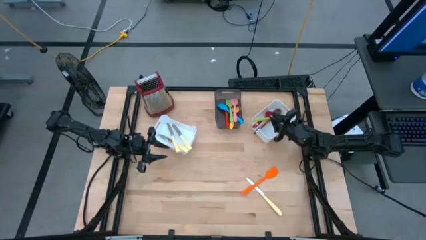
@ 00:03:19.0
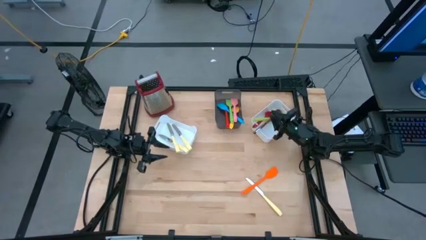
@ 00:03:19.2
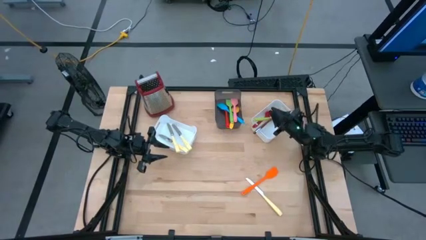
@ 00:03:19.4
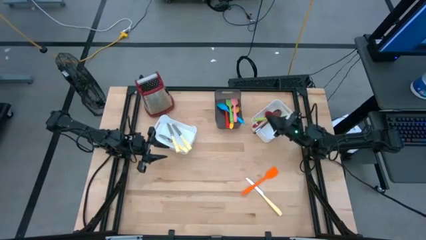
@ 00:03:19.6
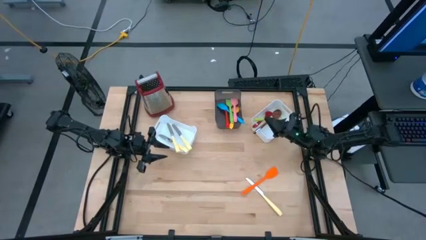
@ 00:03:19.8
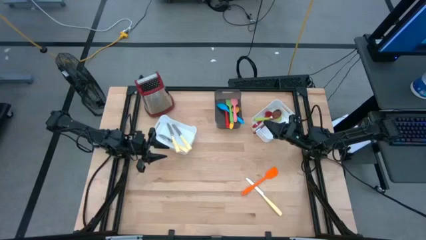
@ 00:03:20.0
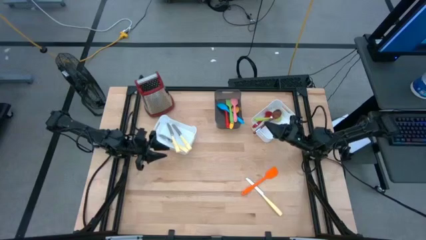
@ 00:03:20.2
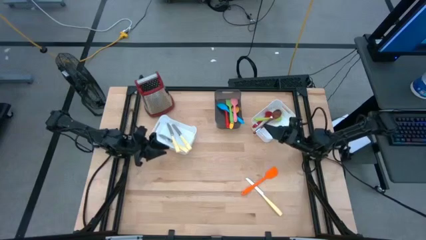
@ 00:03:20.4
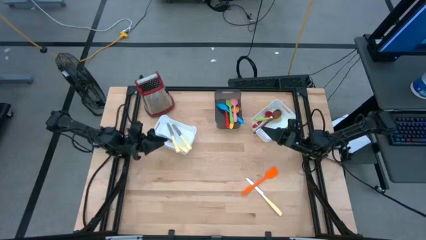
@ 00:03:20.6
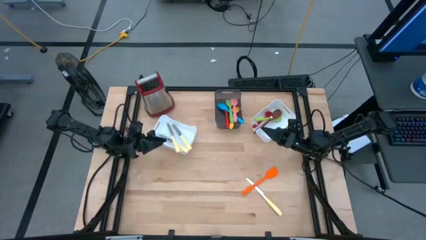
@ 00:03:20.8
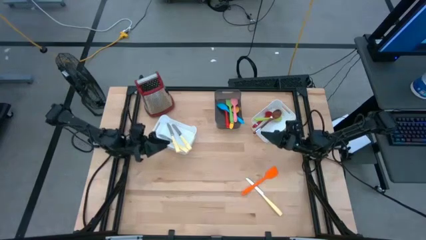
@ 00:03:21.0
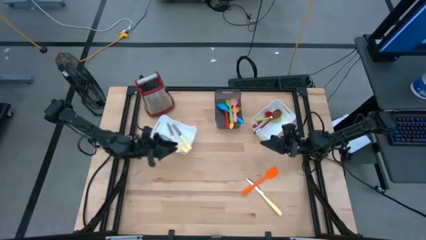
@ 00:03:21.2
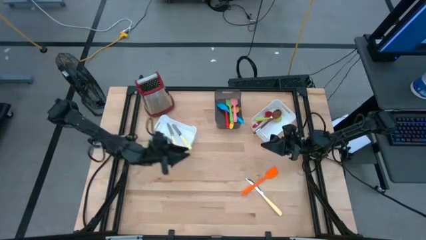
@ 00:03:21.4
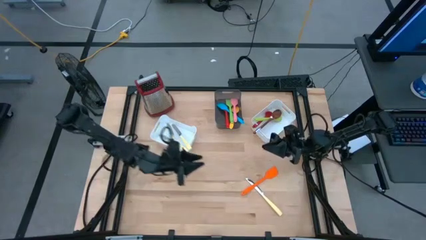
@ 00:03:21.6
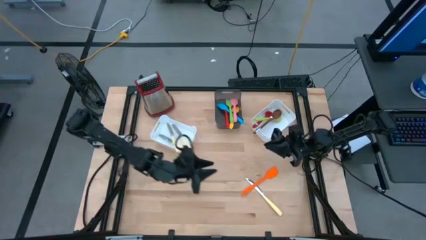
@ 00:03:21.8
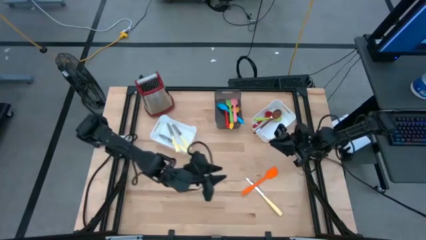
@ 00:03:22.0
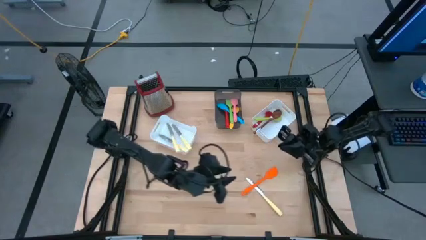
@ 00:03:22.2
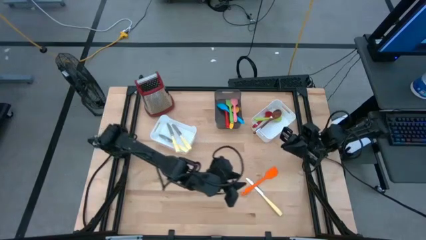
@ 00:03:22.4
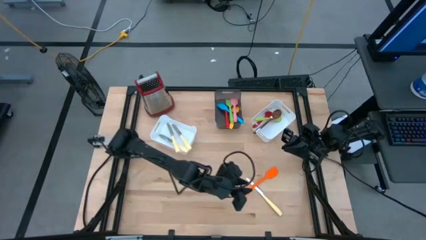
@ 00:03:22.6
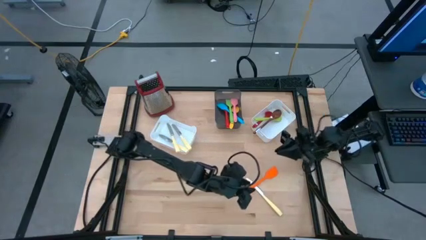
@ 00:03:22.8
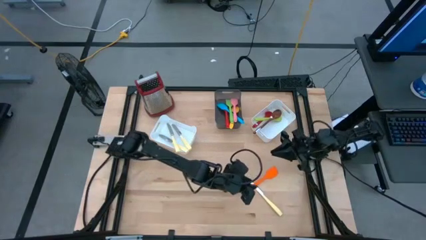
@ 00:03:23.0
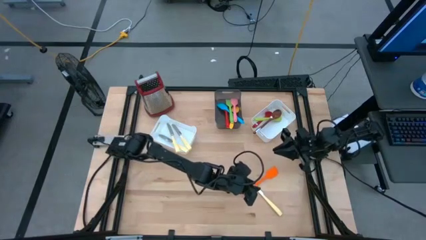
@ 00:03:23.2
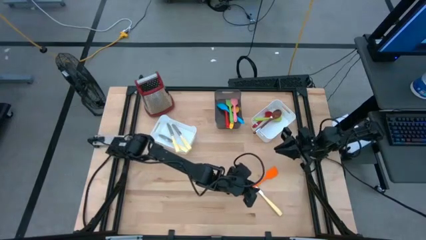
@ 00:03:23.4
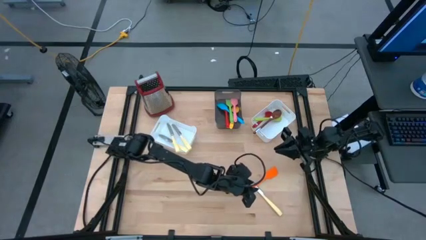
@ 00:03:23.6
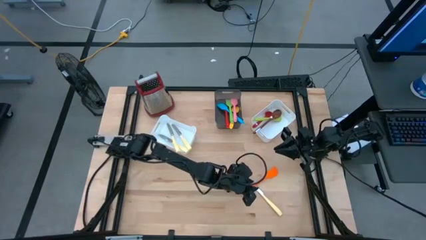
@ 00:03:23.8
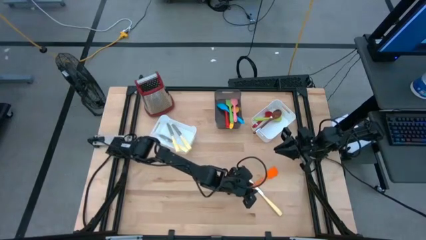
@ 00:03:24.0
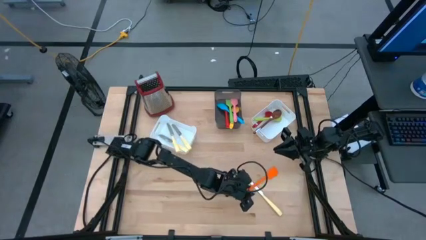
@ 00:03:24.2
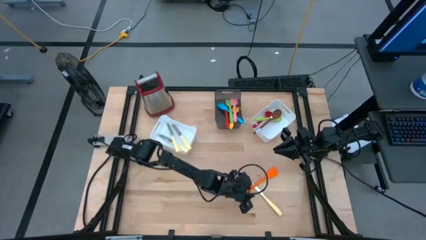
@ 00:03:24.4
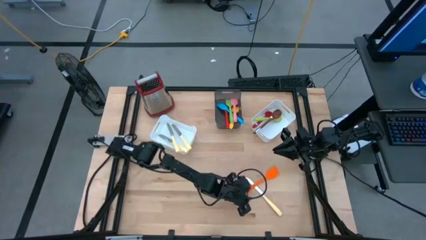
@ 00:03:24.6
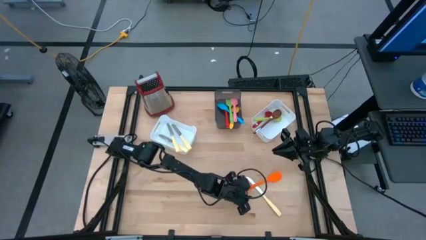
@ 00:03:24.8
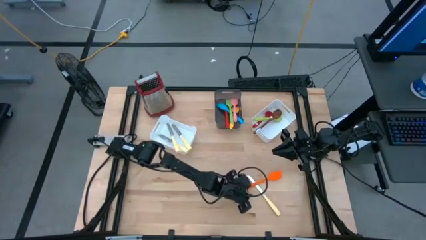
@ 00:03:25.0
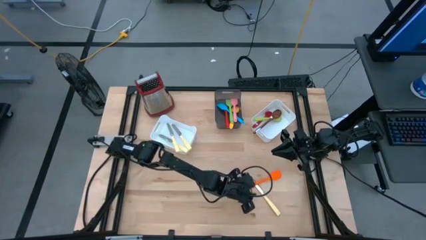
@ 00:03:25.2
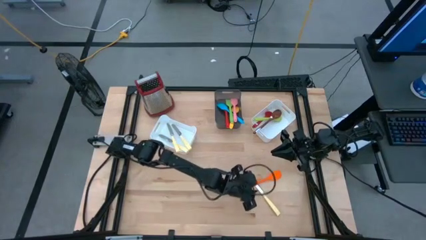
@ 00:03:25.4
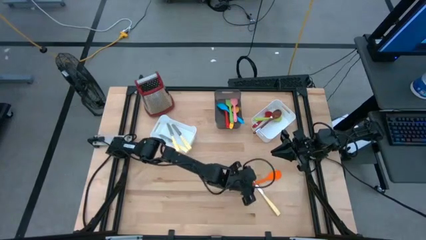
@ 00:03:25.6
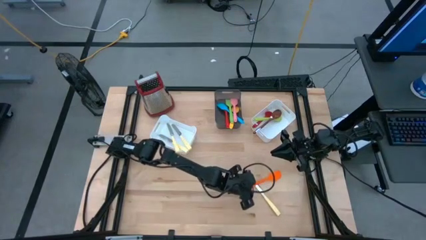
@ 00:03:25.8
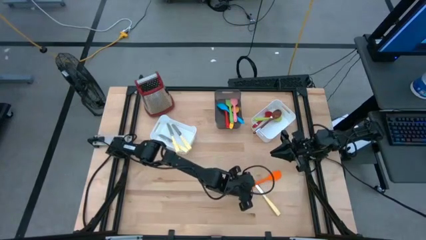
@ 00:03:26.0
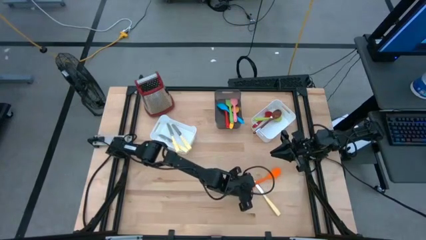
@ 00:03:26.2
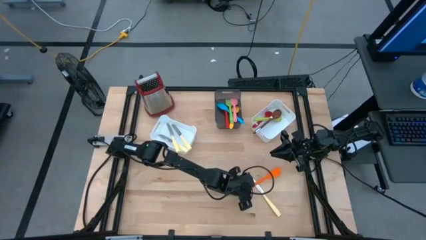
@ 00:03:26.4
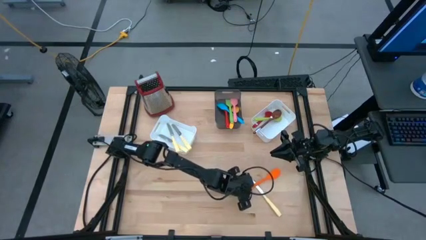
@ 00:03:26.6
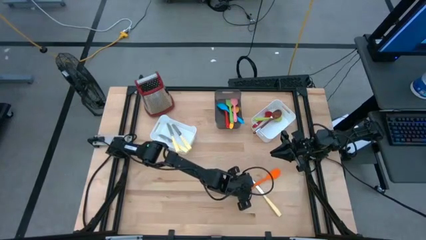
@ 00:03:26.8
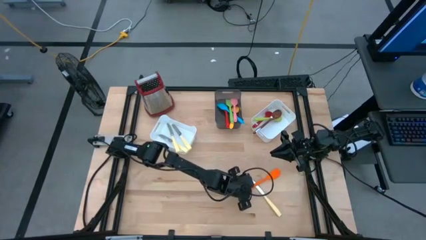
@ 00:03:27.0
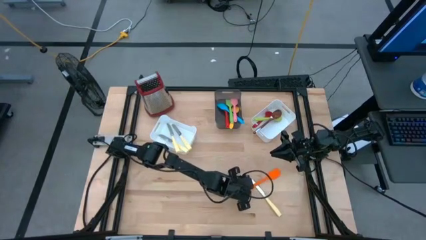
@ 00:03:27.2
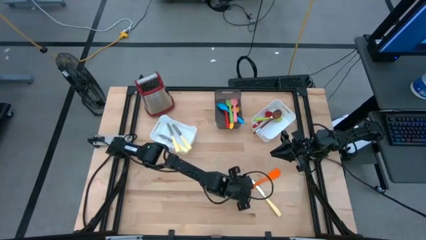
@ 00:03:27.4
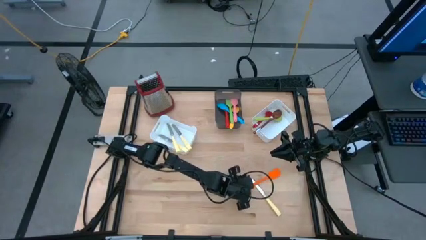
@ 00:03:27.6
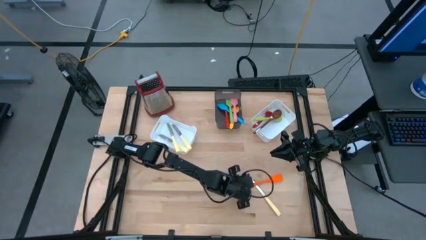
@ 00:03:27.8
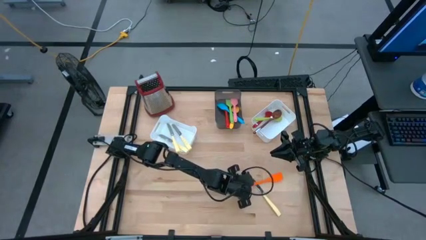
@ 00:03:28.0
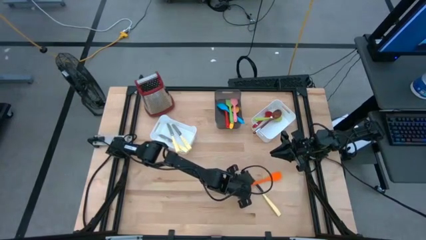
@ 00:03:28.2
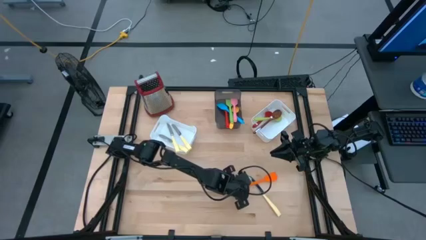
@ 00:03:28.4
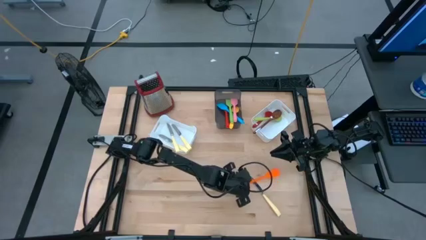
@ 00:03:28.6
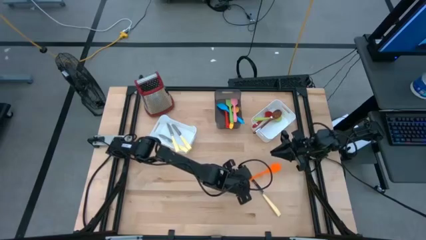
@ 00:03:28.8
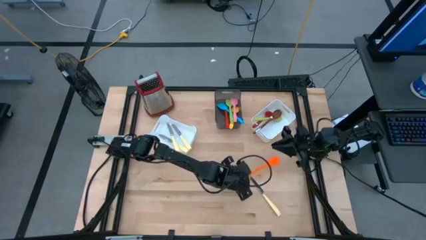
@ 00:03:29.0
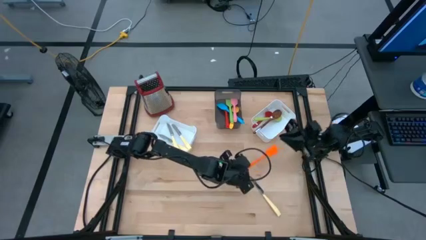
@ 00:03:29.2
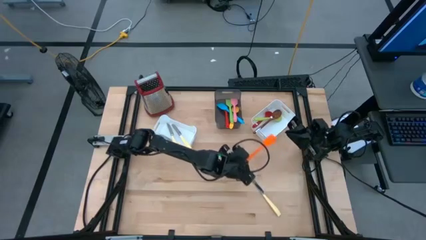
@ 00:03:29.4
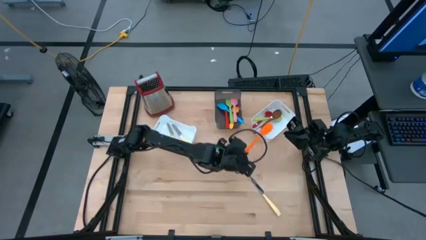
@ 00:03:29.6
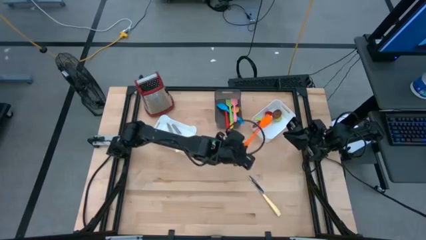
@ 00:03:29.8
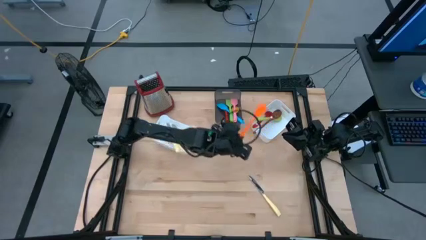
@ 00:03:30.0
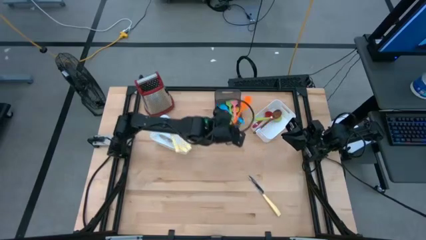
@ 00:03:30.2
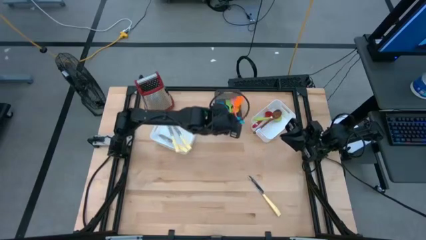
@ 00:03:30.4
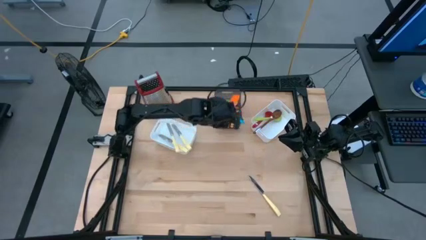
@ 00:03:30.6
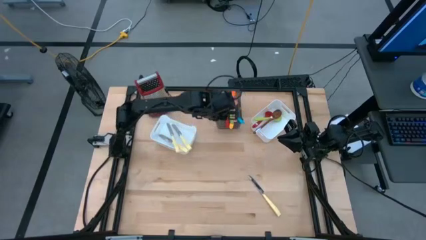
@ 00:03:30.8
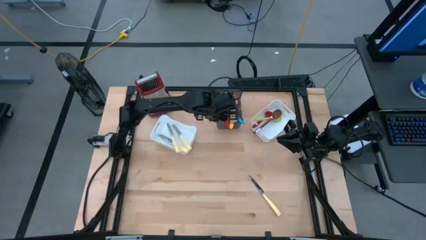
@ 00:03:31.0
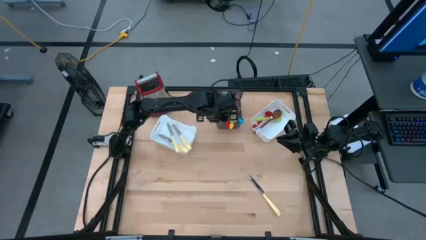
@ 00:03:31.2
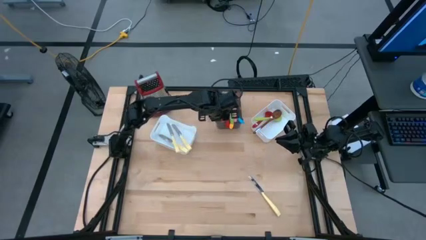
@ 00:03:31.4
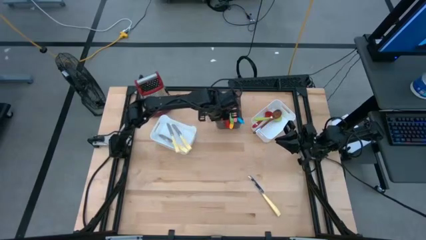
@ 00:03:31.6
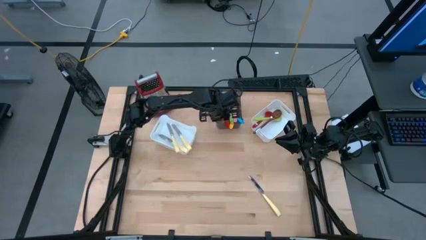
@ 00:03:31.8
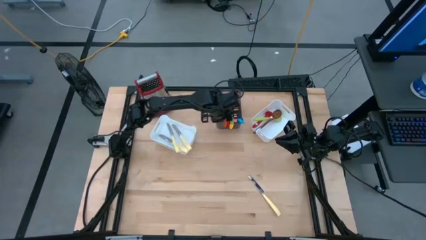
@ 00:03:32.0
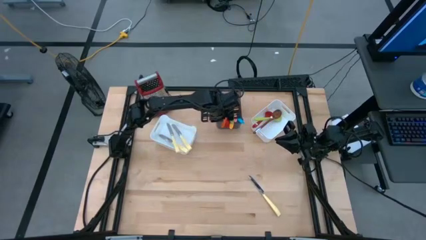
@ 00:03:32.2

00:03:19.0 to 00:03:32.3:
Task: Pick & Place Kitchen Items
Put the orange spatula into the black bin
